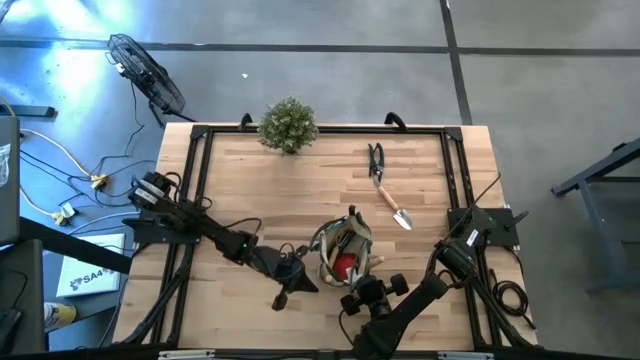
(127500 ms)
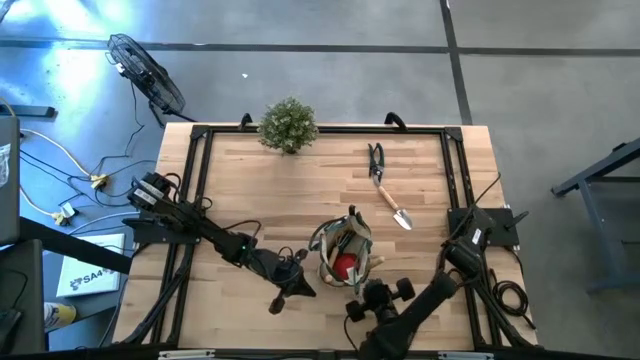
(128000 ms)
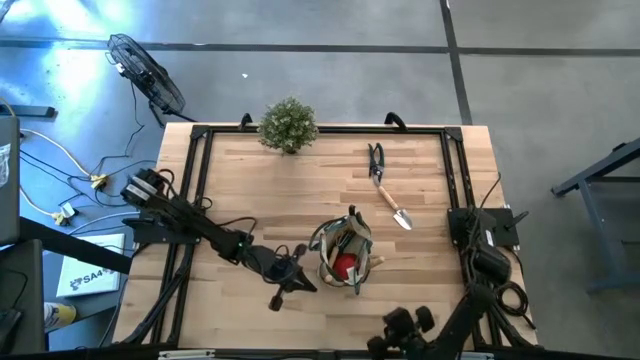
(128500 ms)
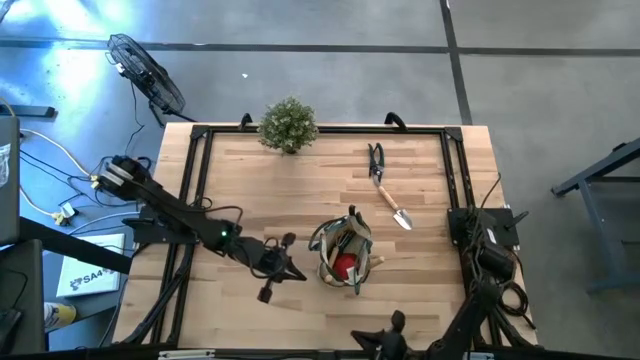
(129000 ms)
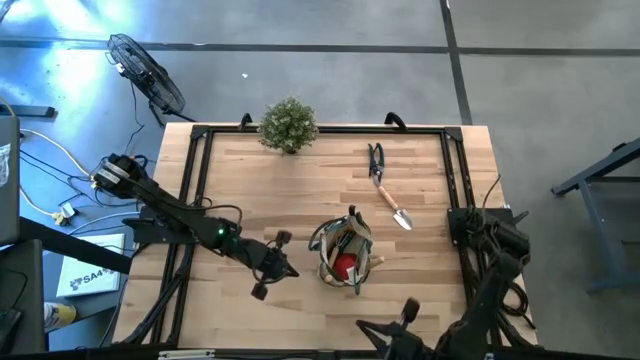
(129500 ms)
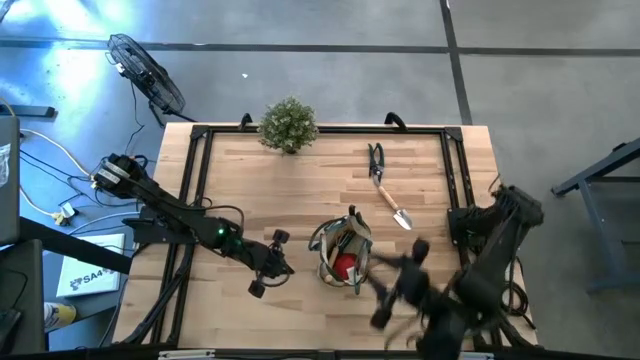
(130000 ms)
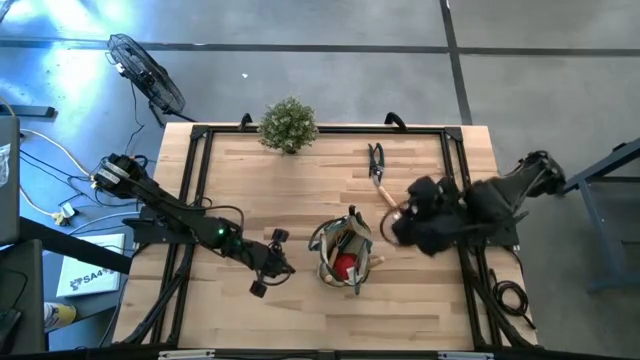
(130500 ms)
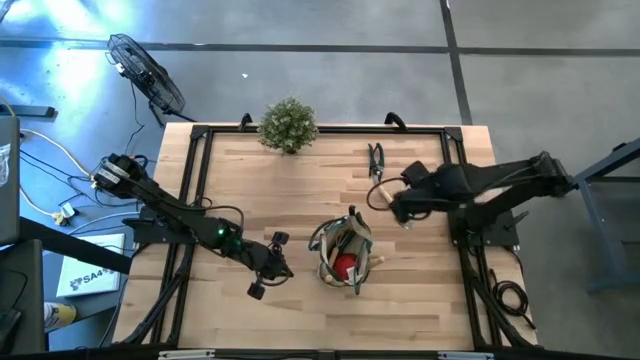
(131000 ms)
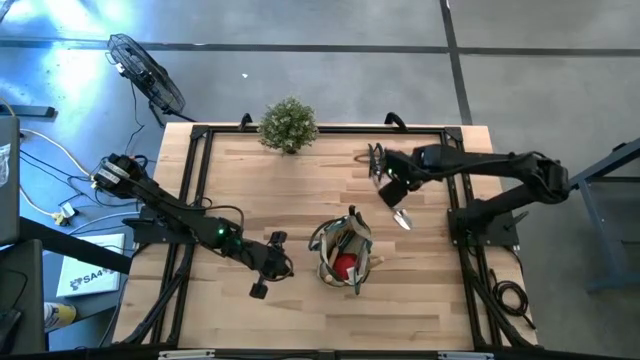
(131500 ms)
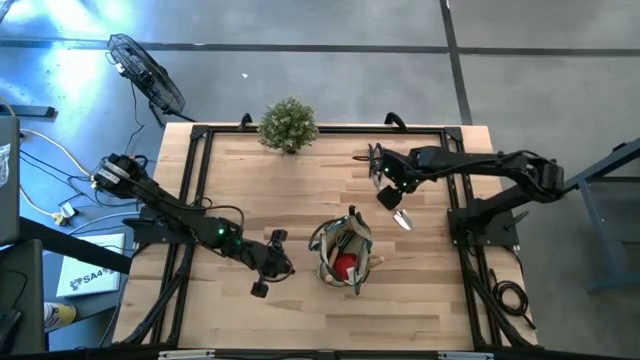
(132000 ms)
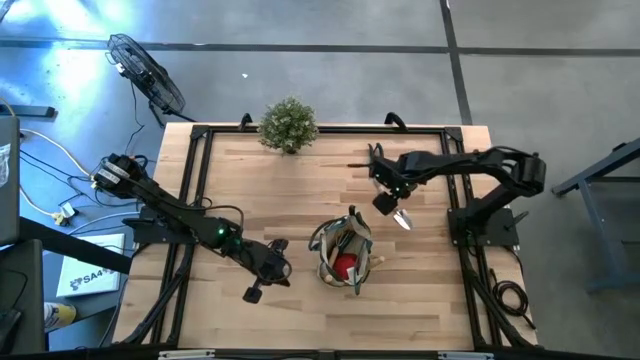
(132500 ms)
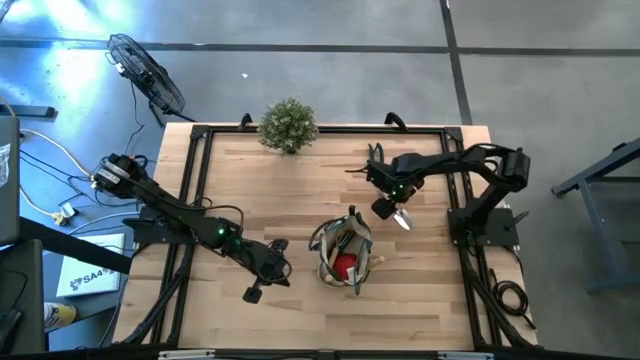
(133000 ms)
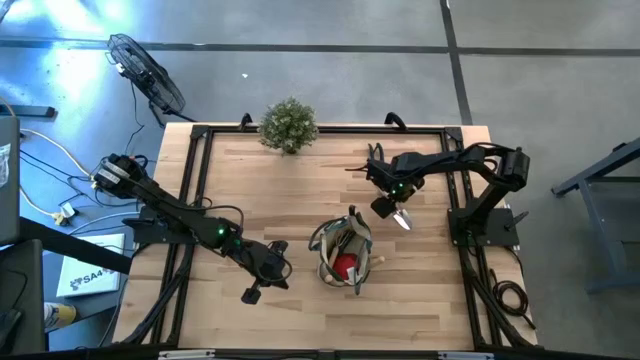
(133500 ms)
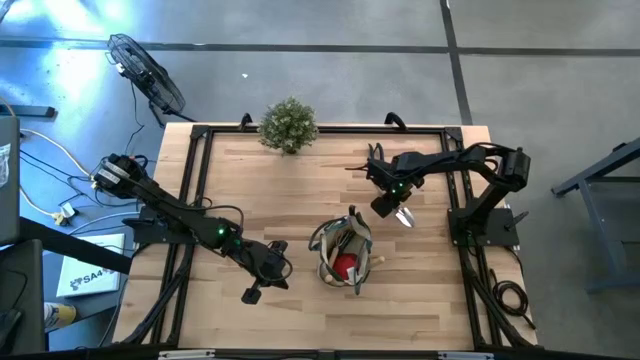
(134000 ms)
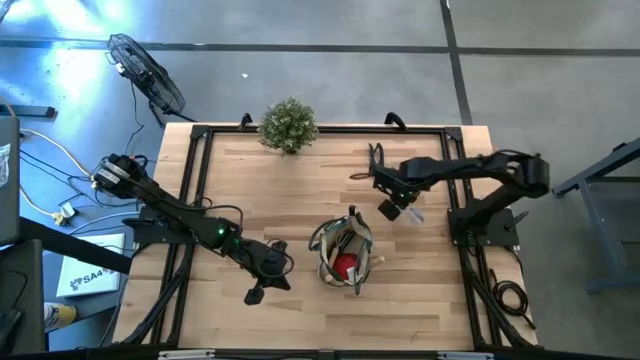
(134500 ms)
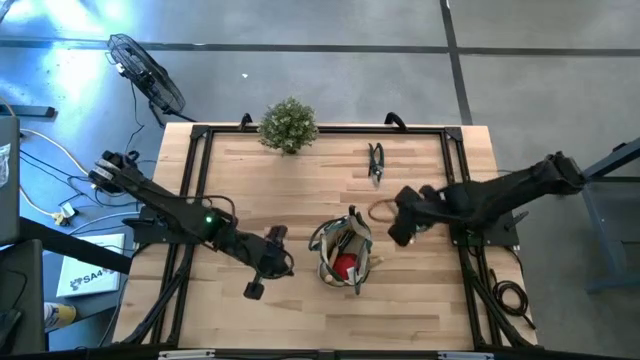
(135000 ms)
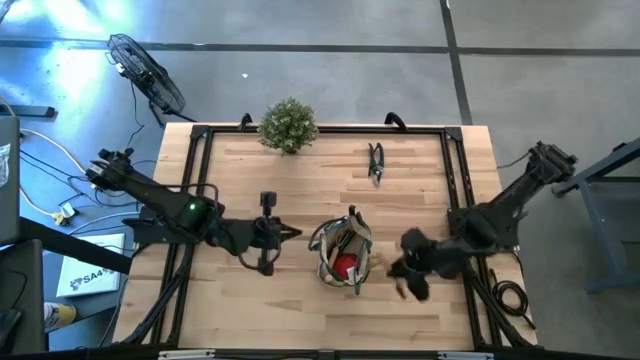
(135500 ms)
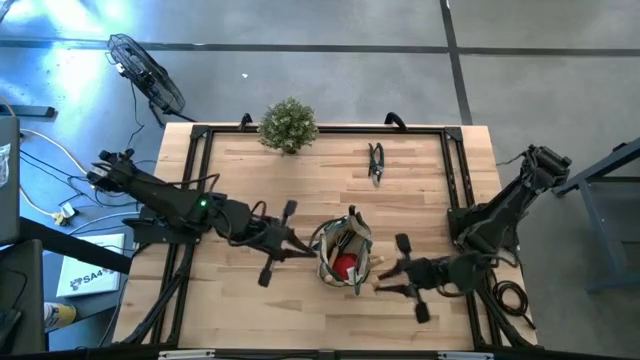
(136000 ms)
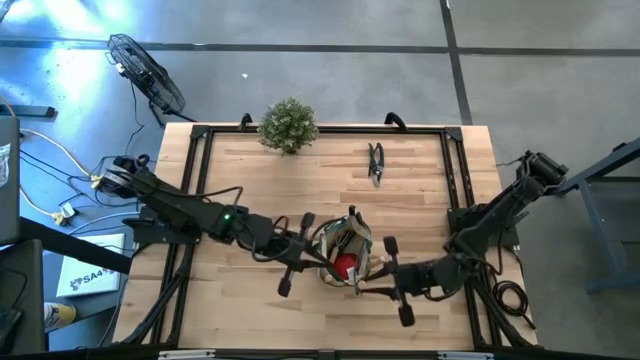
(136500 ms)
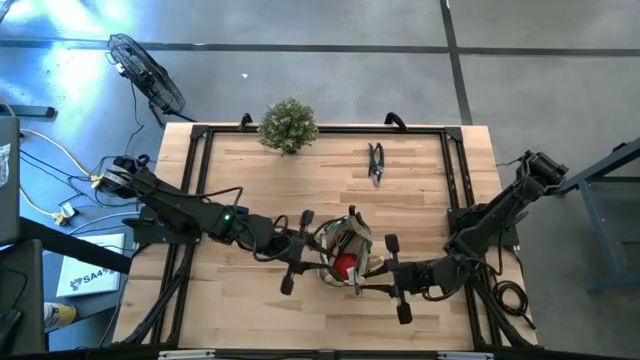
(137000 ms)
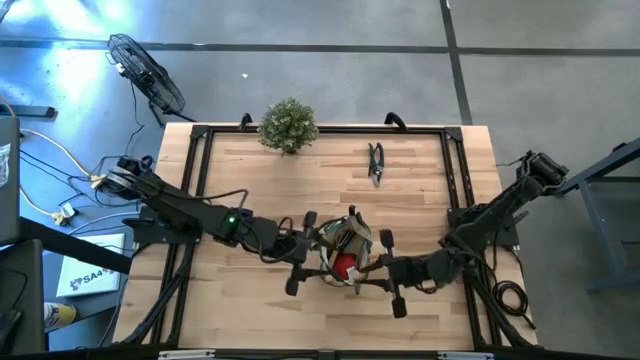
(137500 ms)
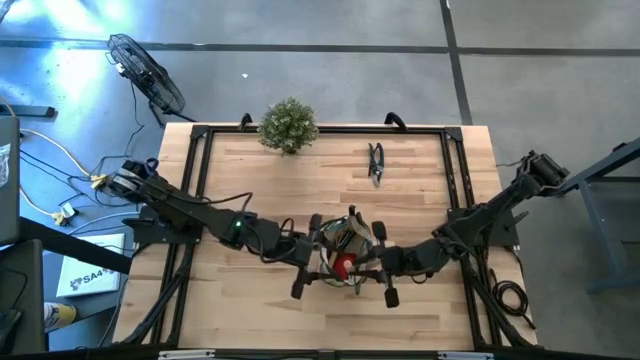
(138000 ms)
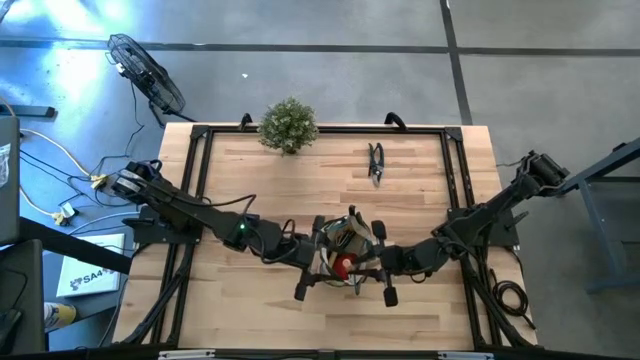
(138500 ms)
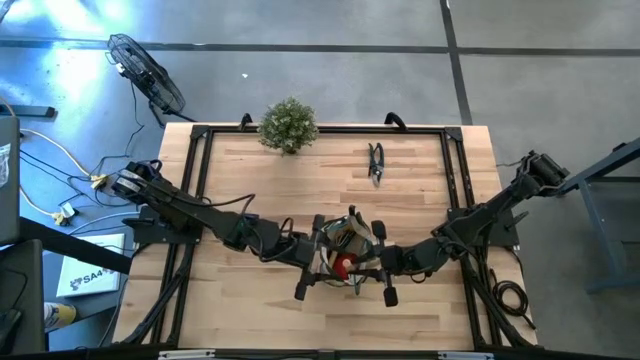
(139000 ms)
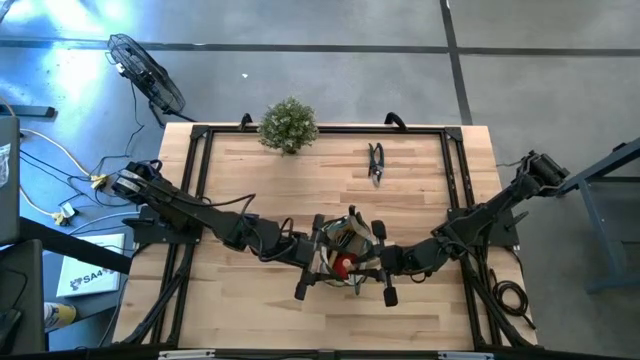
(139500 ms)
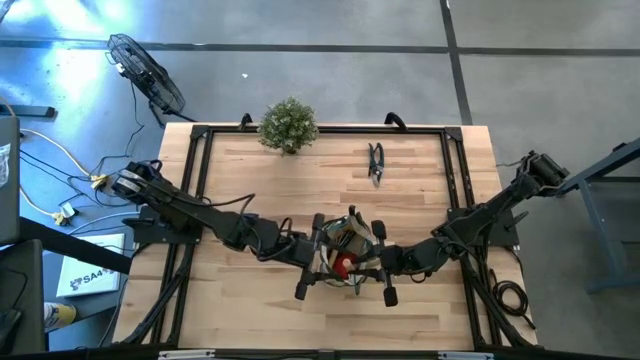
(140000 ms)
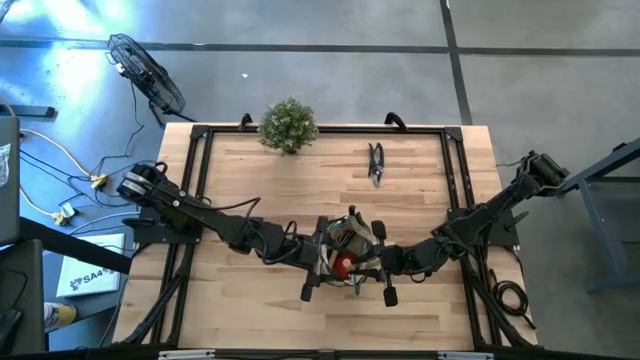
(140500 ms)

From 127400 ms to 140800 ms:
Task: Pick & Place Garden tools in Gardening bag
Put the brown trowel into the green bag

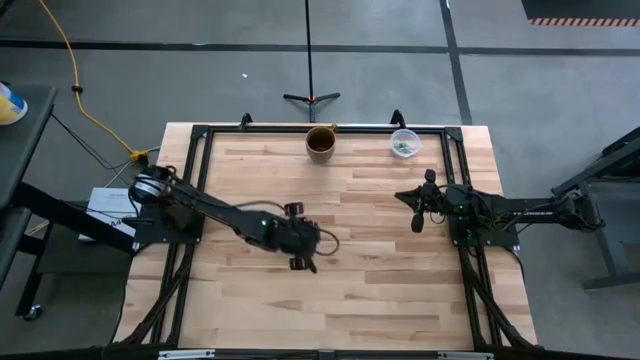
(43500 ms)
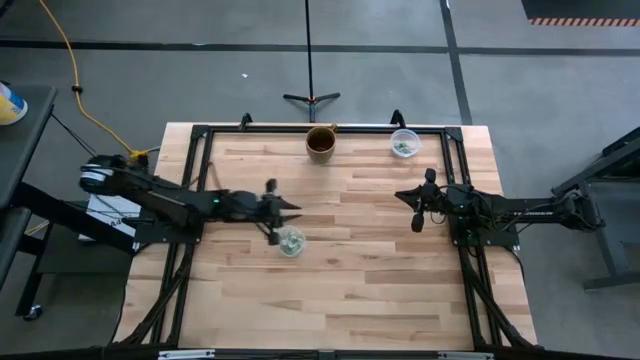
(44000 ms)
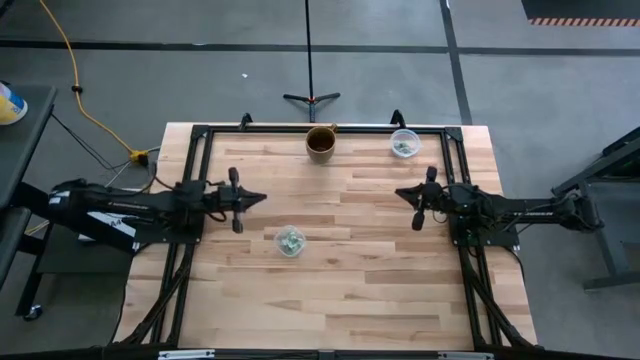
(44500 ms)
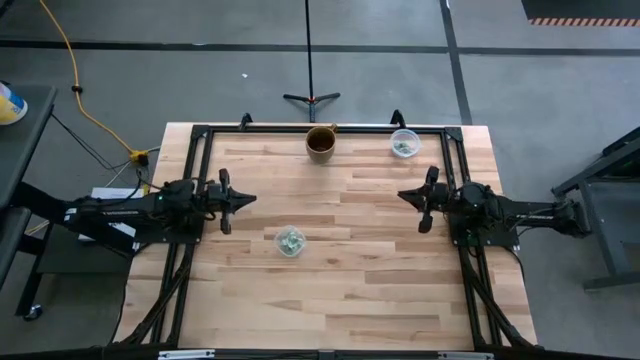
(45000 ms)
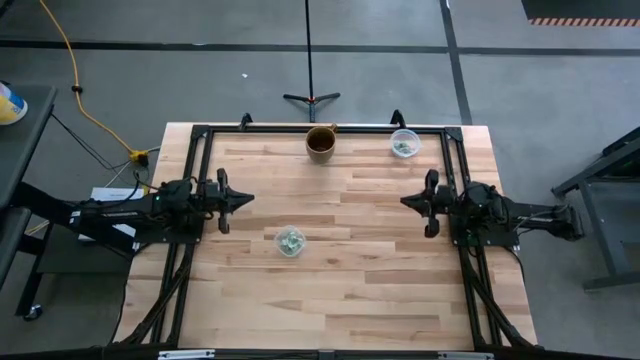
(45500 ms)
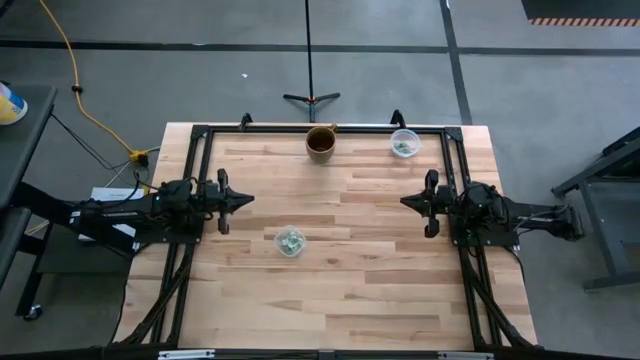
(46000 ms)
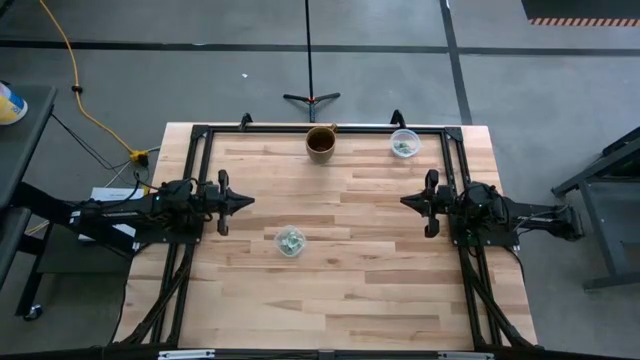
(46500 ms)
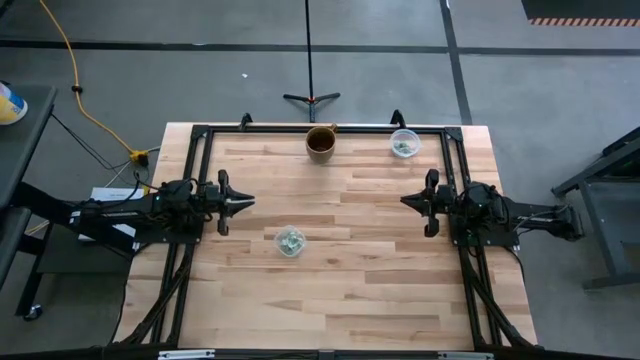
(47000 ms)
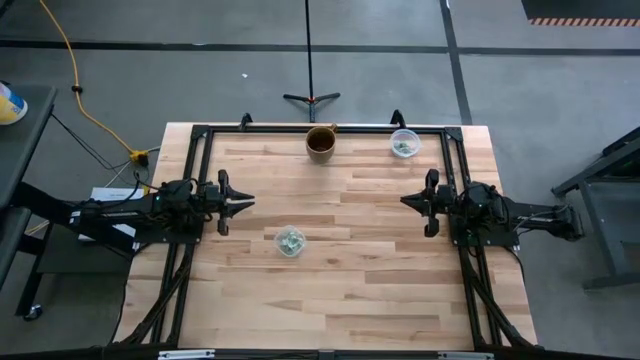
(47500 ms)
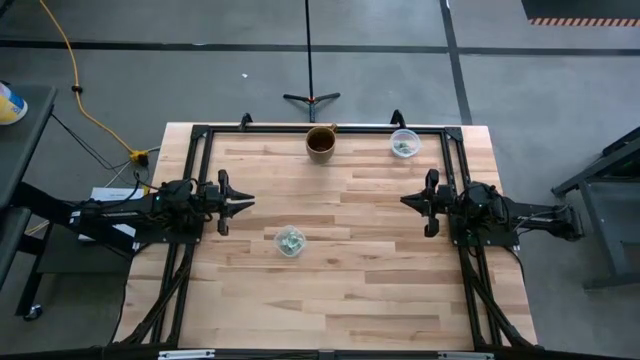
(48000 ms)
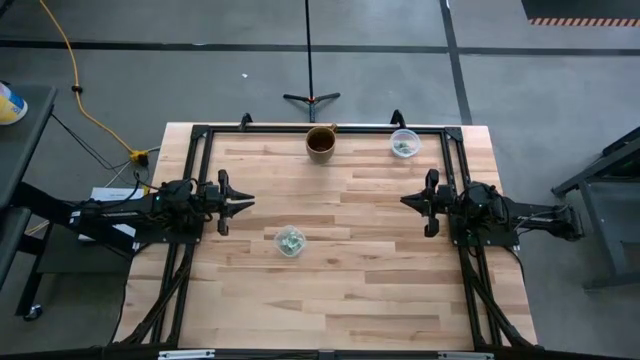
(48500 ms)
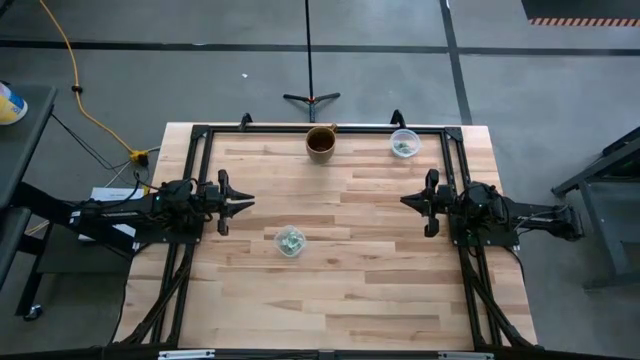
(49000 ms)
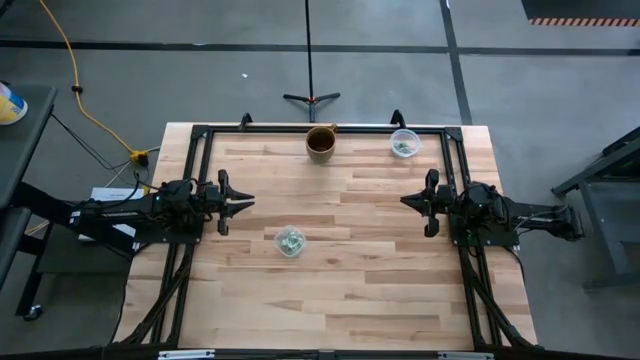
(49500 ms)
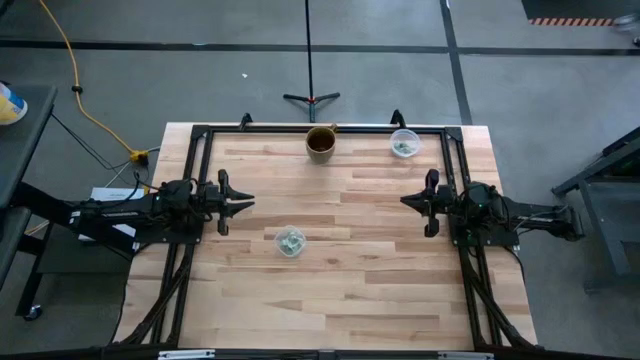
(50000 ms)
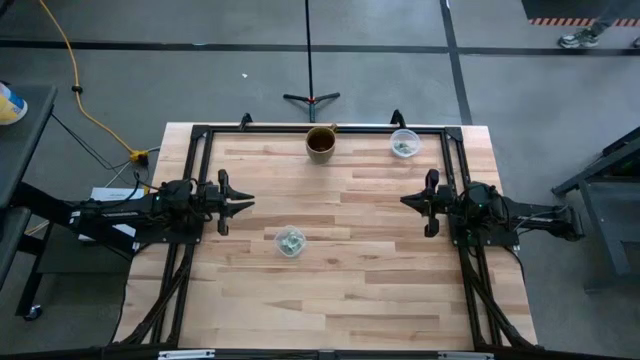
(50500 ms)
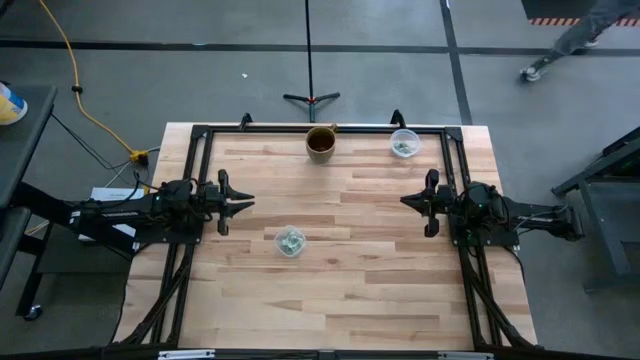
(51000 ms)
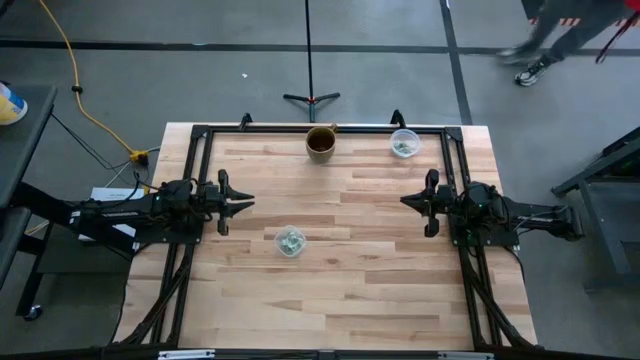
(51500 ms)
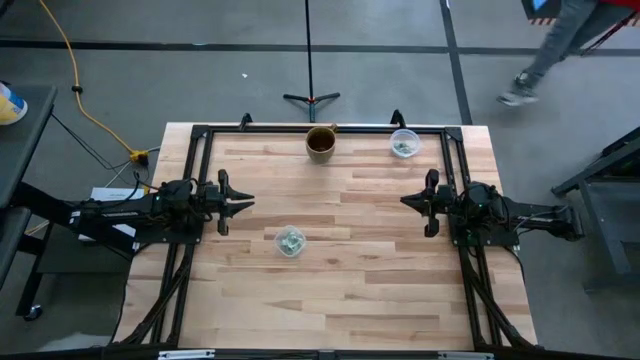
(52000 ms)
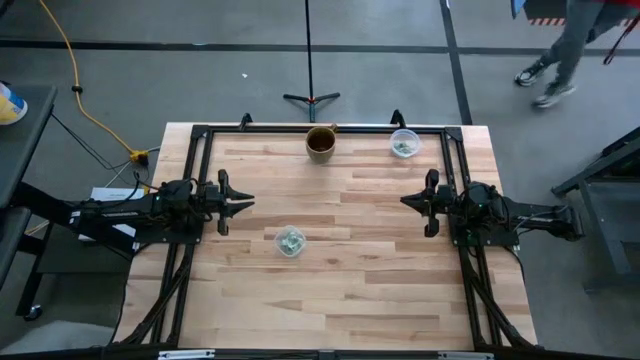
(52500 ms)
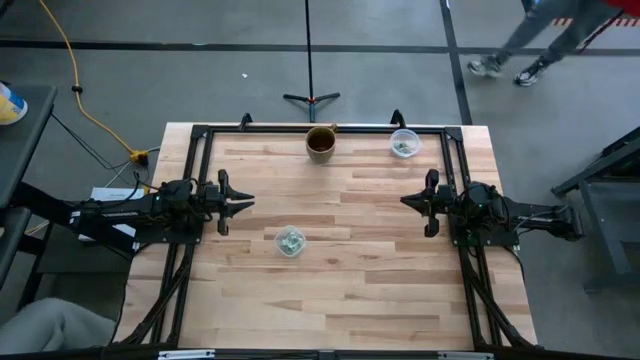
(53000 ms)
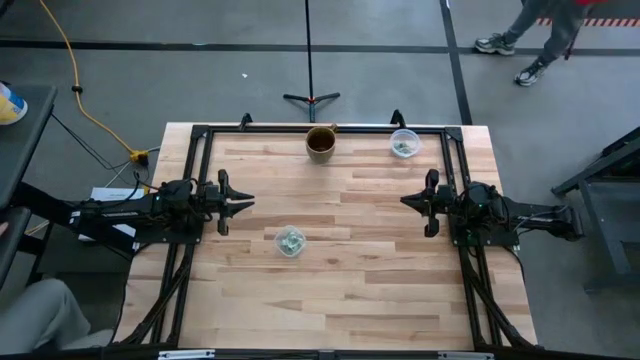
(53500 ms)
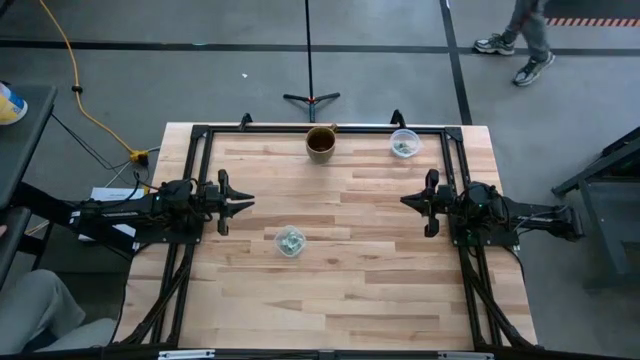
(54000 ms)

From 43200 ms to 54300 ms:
Task: Pick and place items into bin
Return to Home Position
